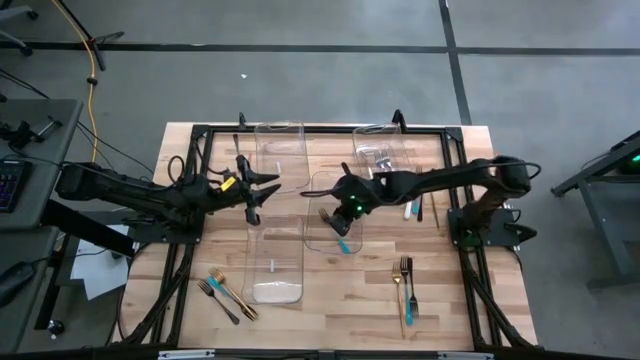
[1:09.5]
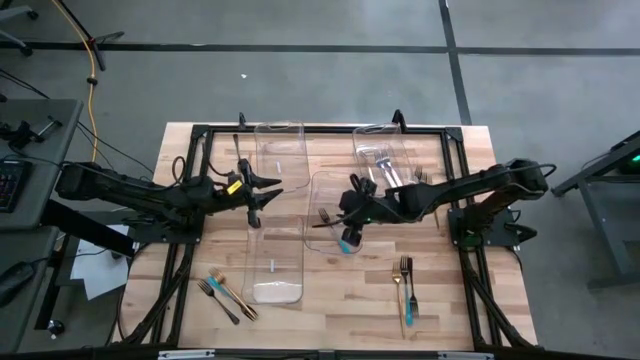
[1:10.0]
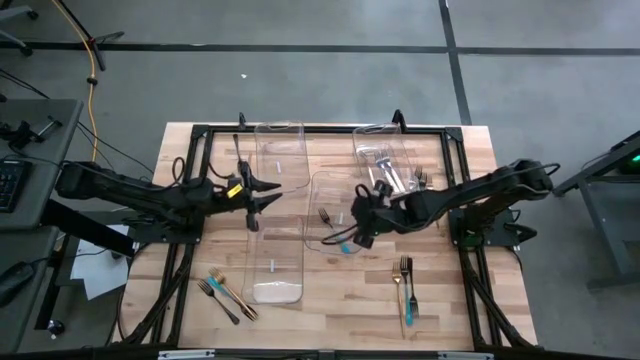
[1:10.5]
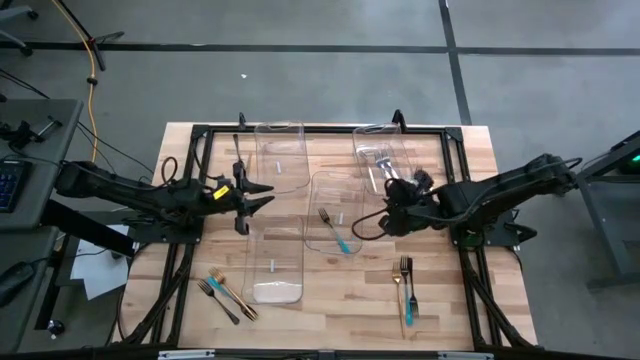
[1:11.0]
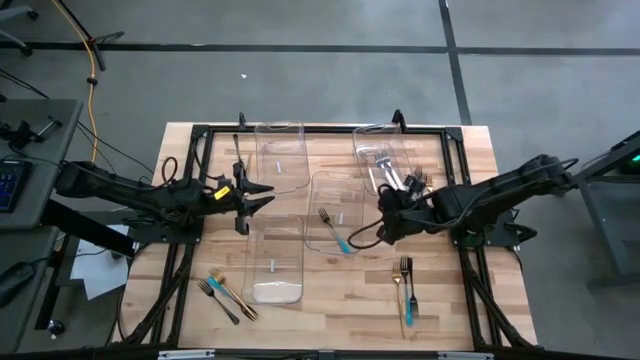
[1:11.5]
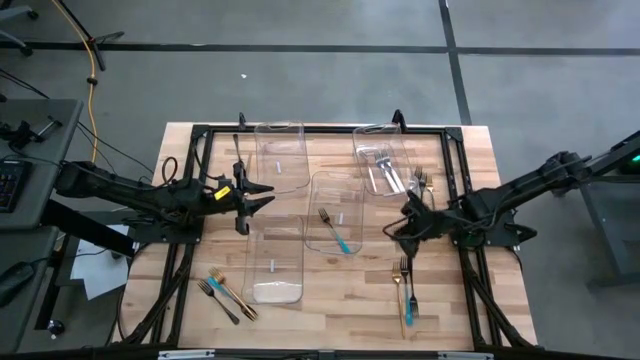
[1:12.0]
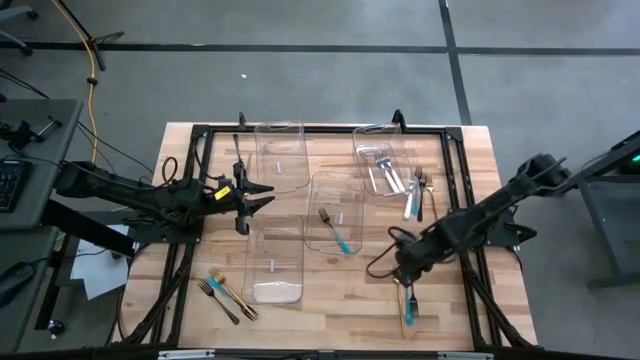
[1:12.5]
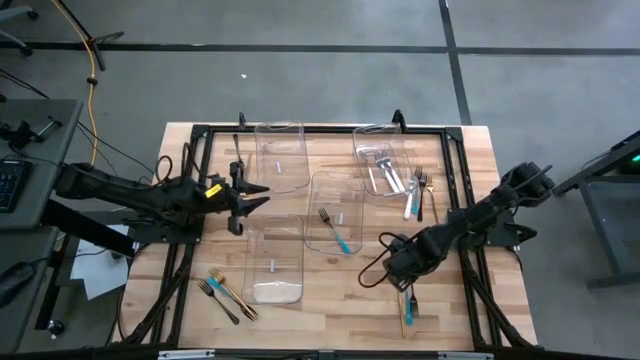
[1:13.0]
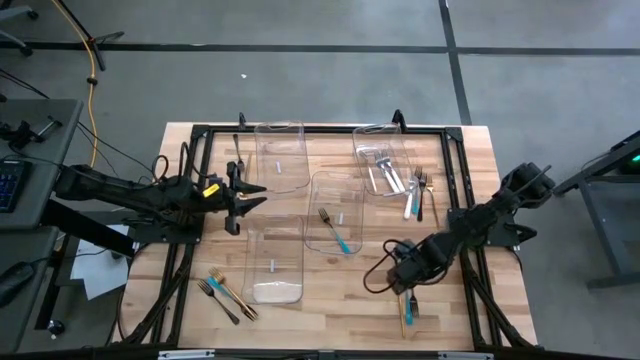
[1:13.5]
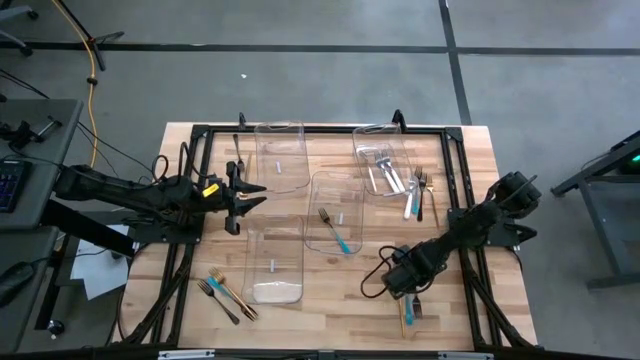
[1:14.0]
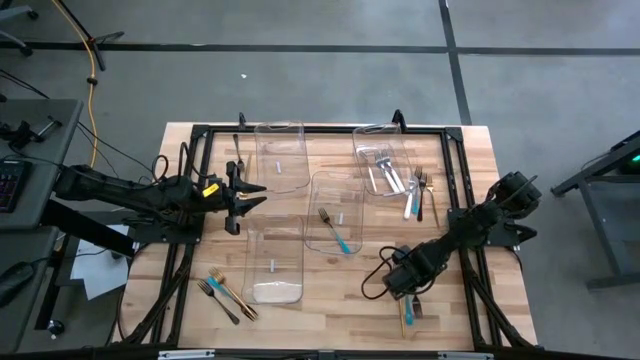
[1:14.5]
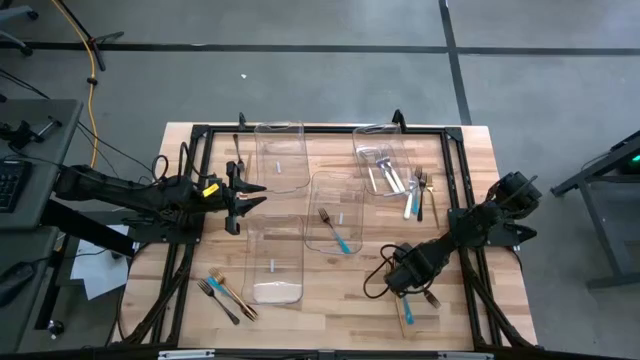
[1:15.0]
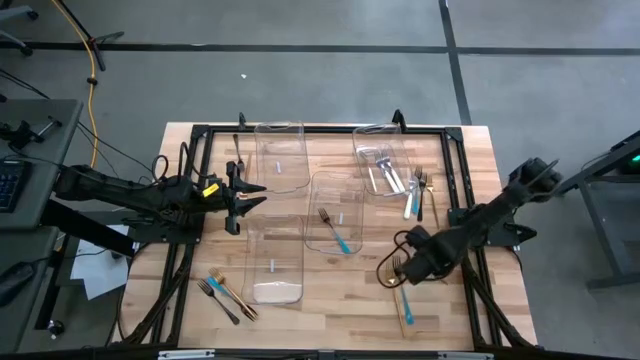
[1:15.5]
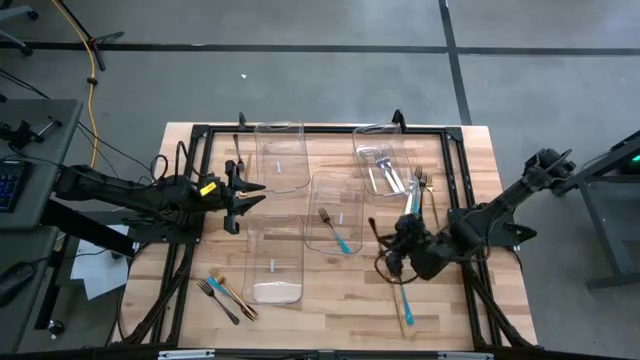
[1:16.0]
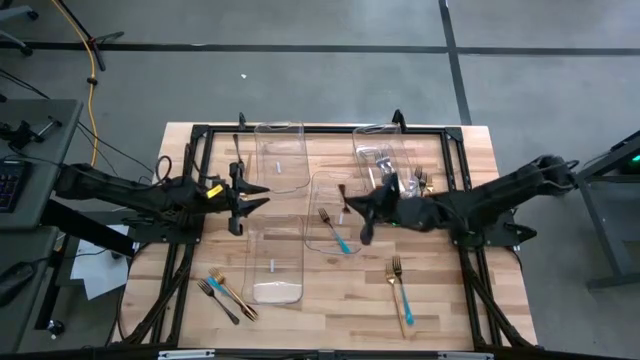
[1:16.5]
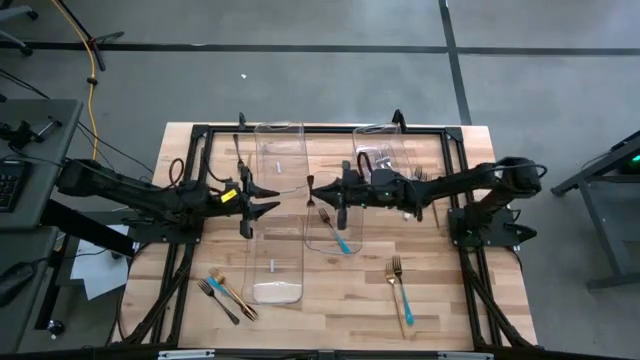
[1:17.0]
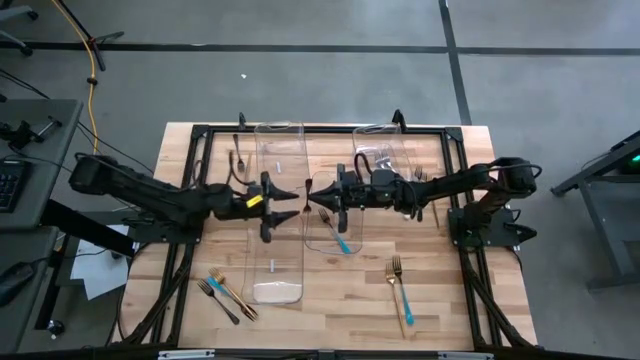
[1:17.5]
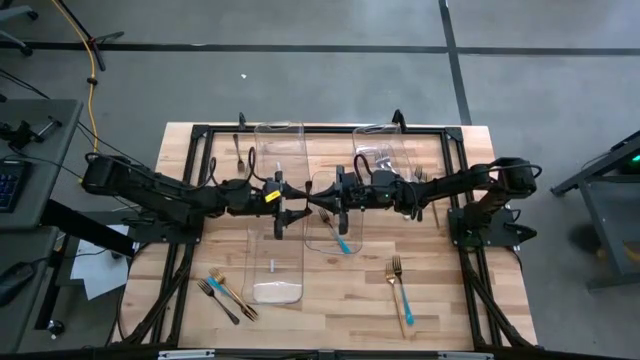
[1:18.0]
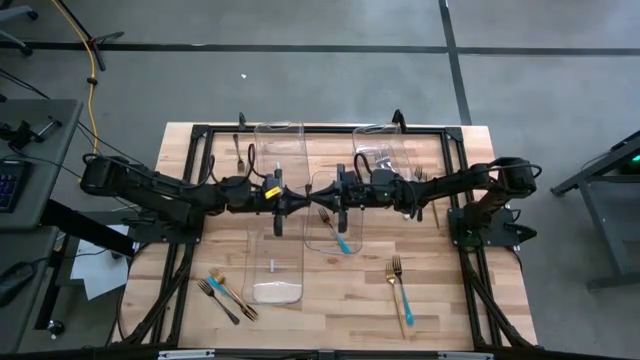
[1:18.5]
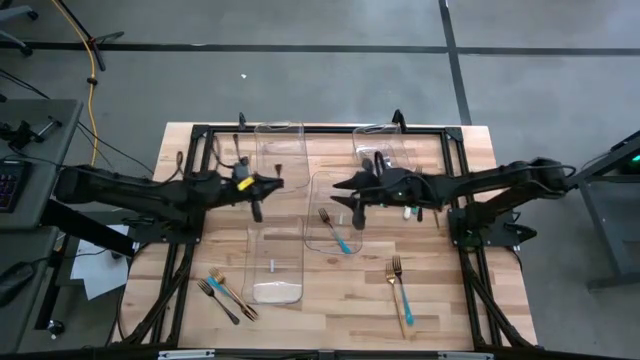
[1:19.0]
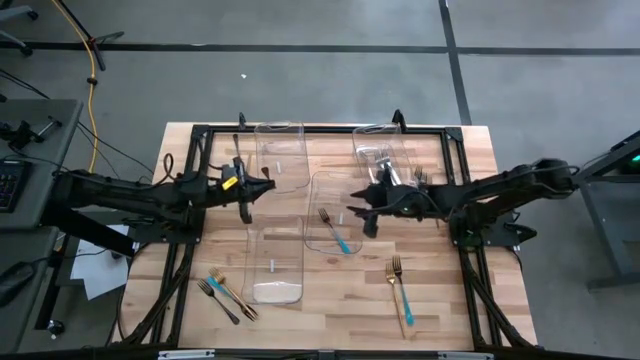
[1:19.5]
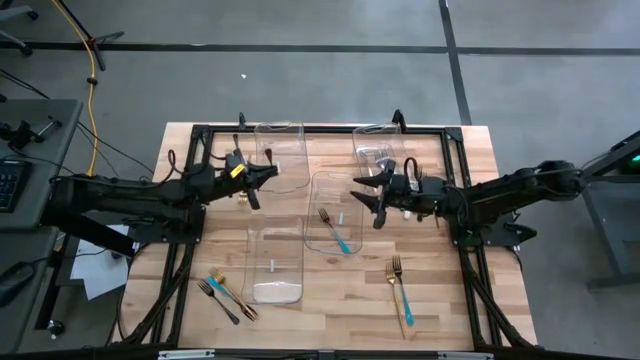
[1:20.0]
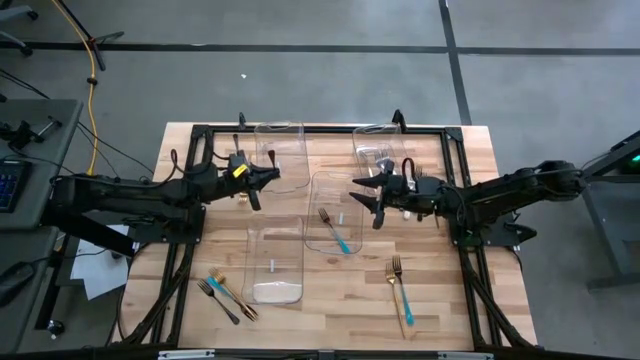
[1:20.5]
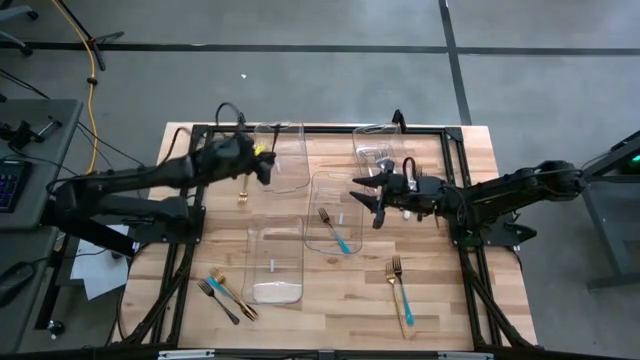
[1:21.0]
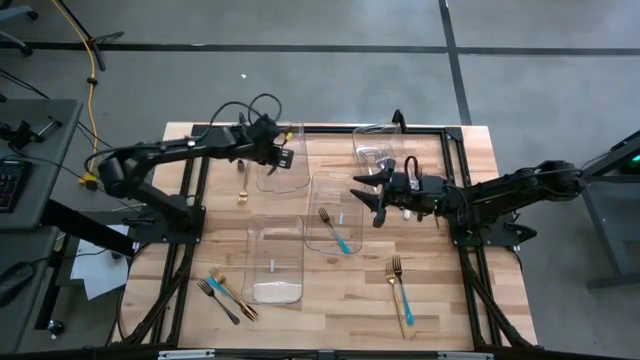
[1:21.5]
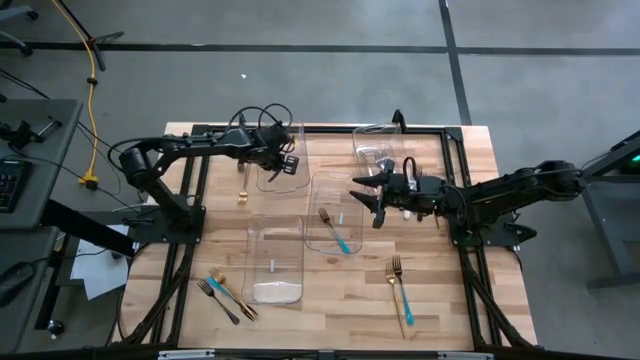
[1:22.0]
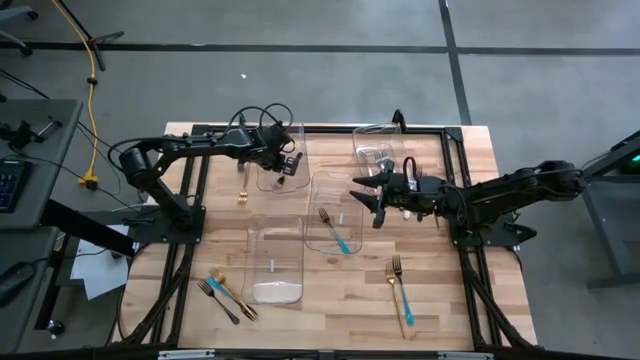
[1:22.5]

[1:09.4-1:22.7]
Task: Sort silverware by color (type)
Put the black fork into the top left transparent bin

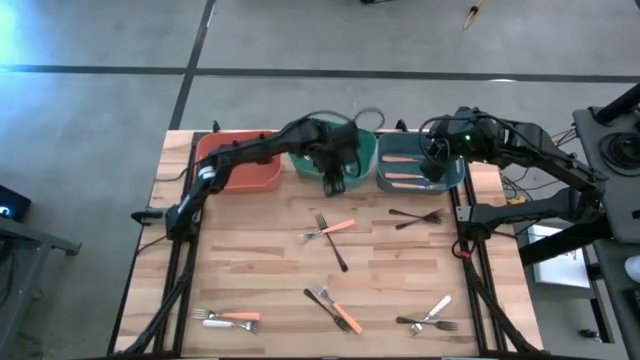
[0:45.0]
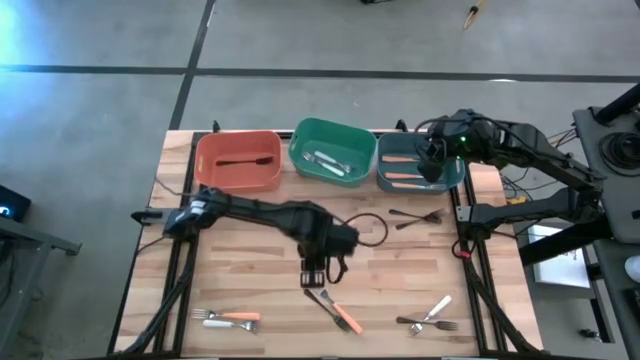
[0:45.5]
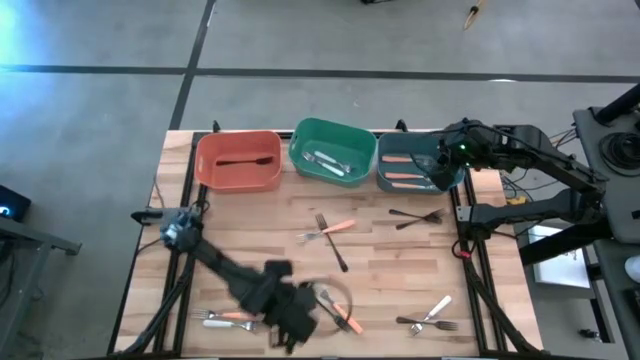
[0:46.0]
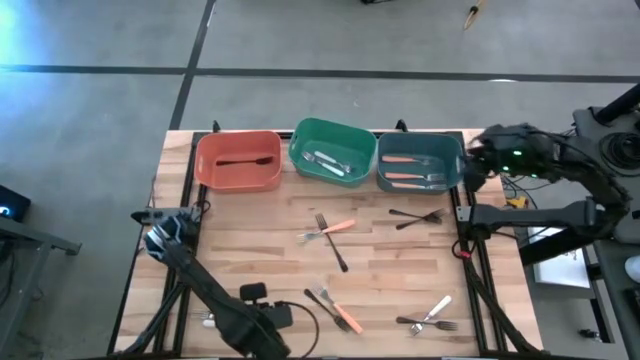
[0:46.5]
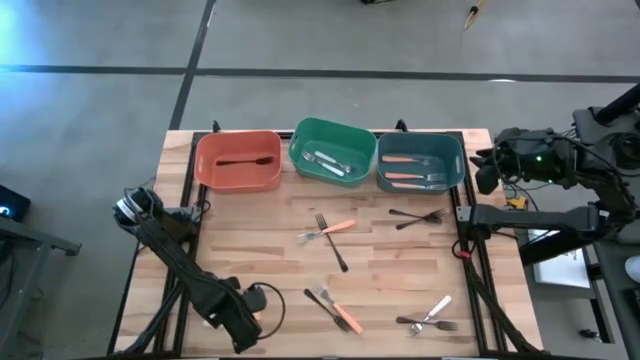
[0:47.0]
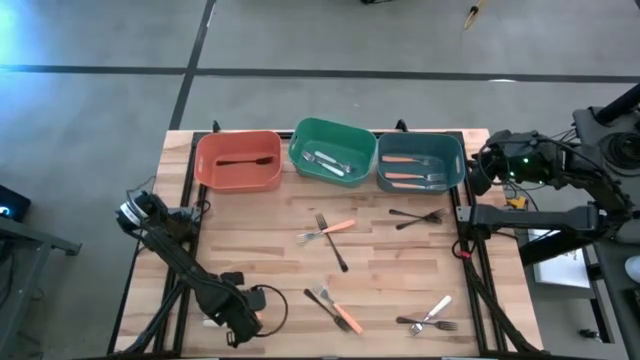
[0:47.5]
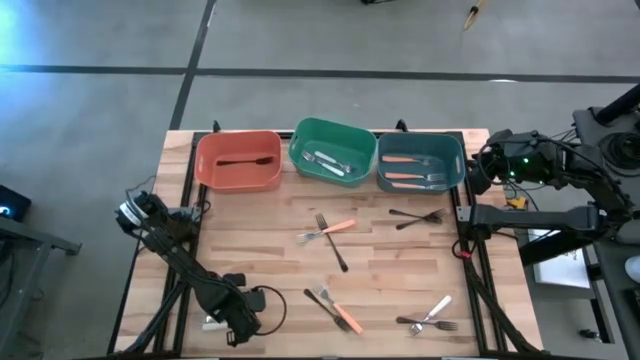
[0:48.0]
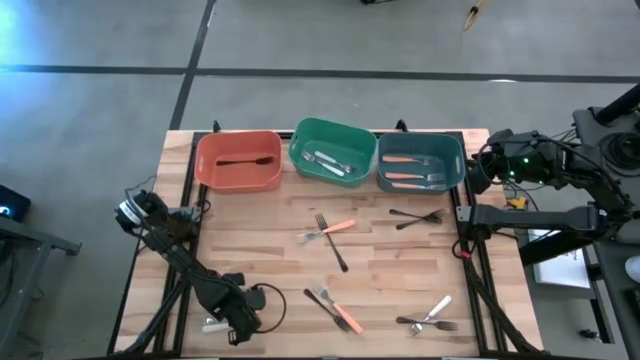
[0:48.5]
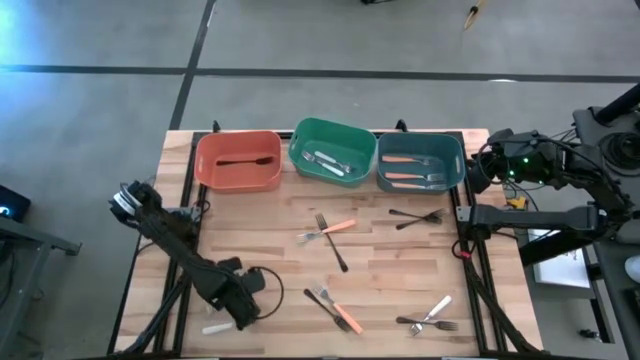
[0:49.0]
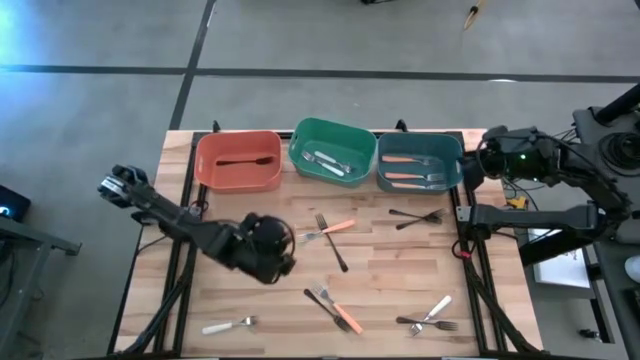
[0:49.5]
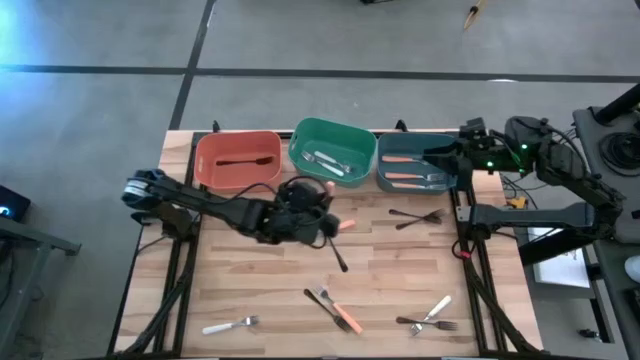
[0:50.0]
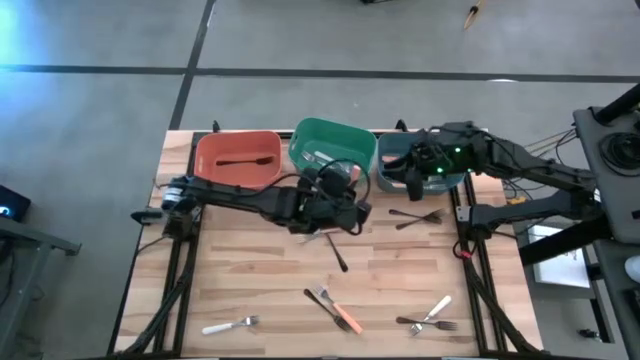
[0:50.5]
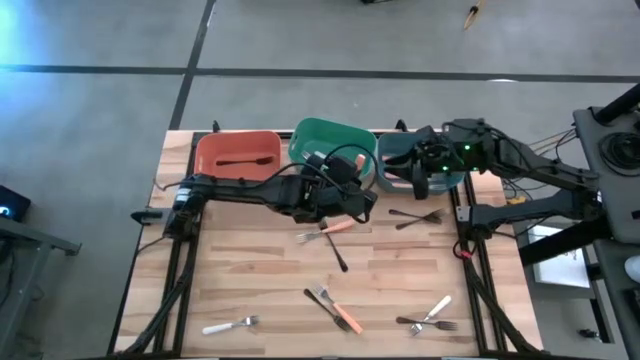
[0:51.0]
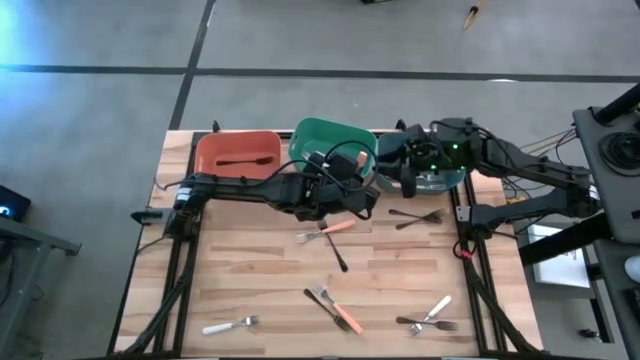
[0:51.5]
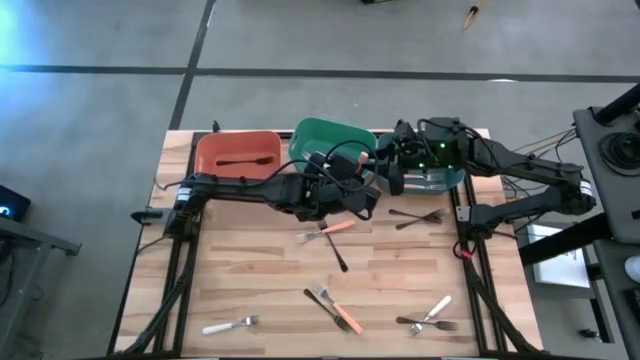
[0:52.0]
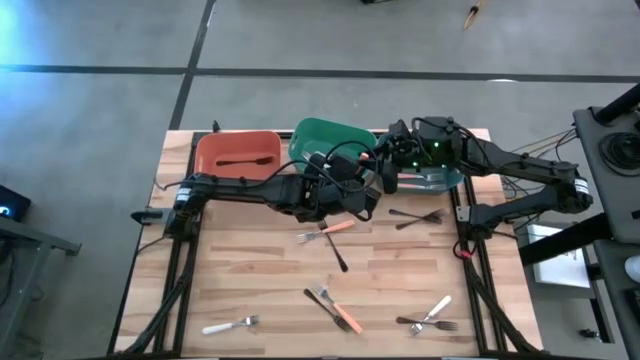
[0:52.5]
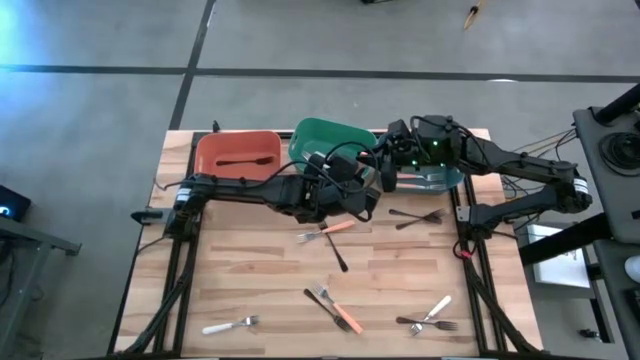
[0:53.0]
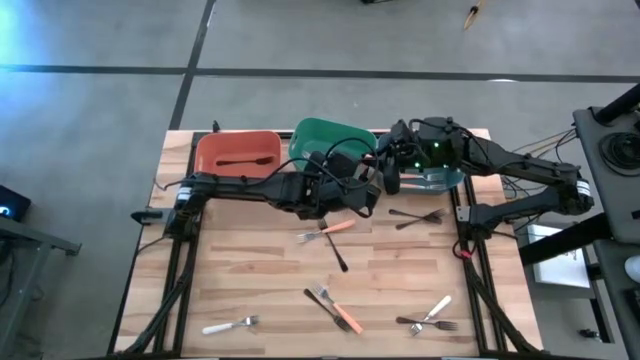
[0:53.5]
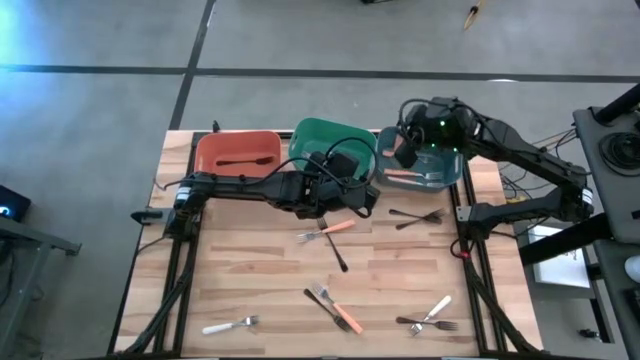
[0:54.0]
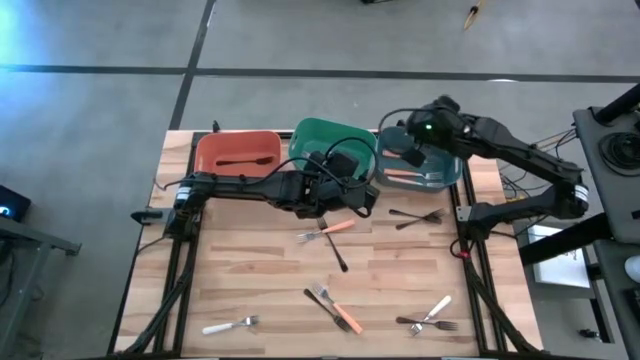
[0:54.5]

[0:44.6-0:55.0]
Task: Sort silverware by color (type)
Put the light orange fork into the blue bin
